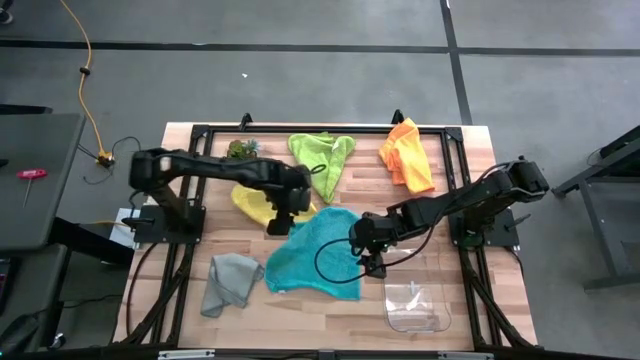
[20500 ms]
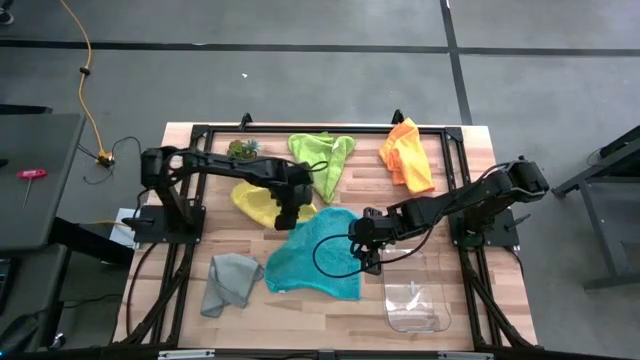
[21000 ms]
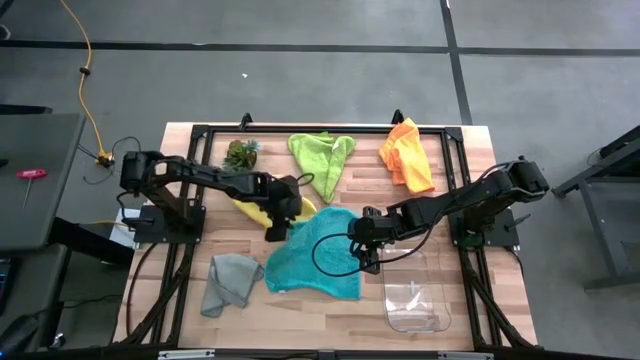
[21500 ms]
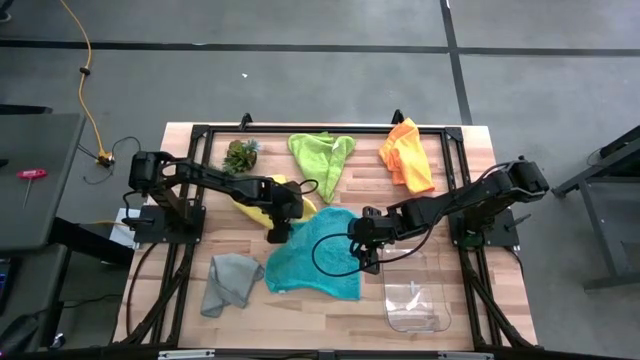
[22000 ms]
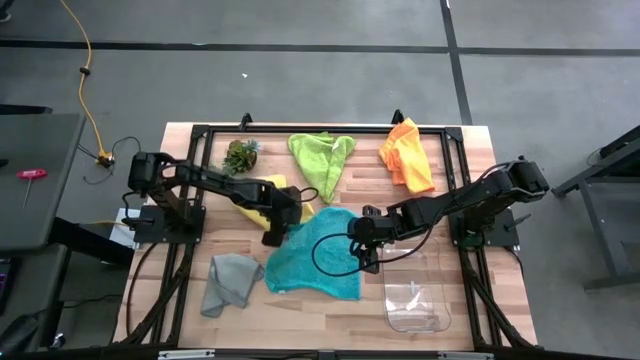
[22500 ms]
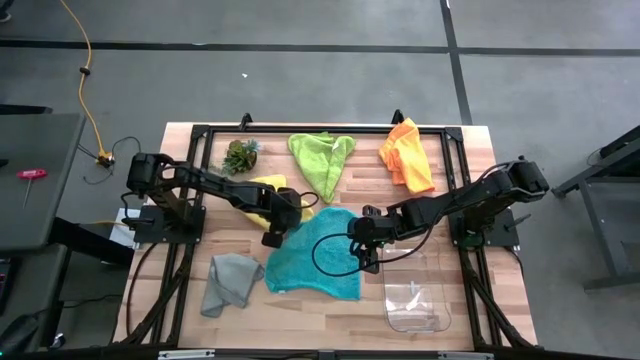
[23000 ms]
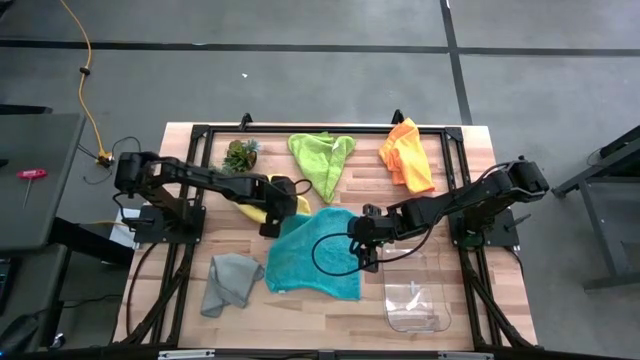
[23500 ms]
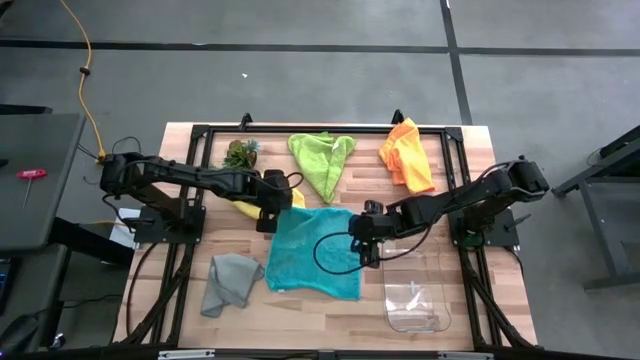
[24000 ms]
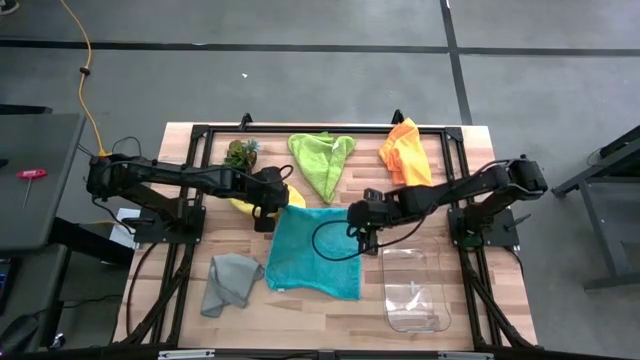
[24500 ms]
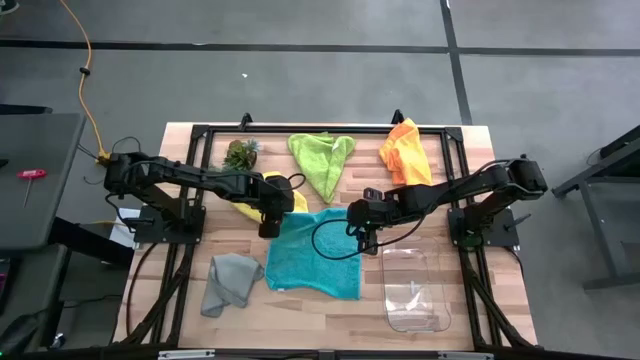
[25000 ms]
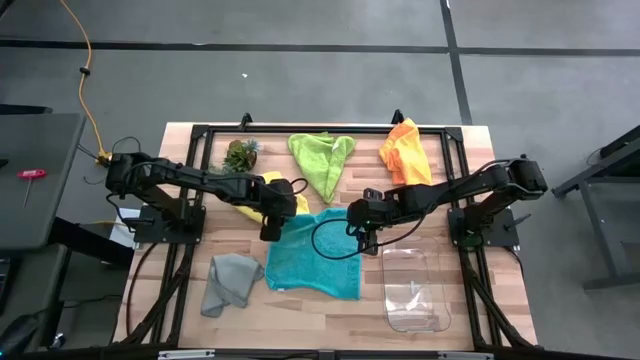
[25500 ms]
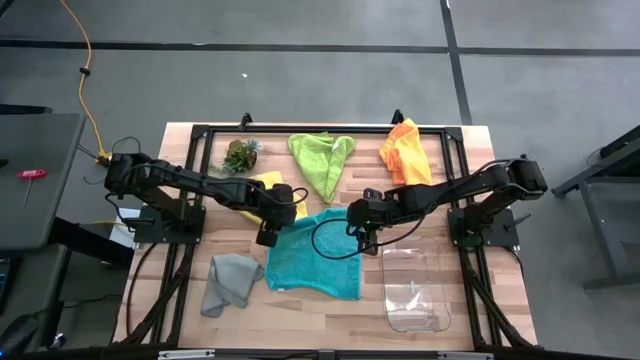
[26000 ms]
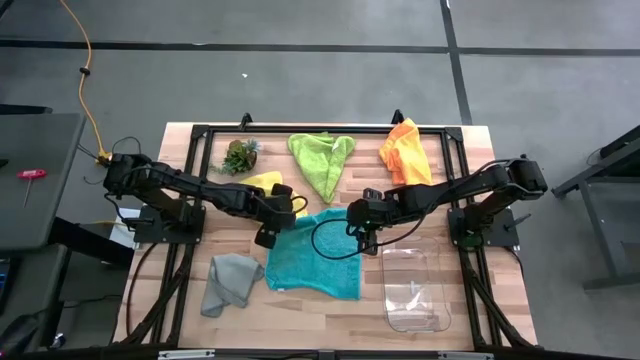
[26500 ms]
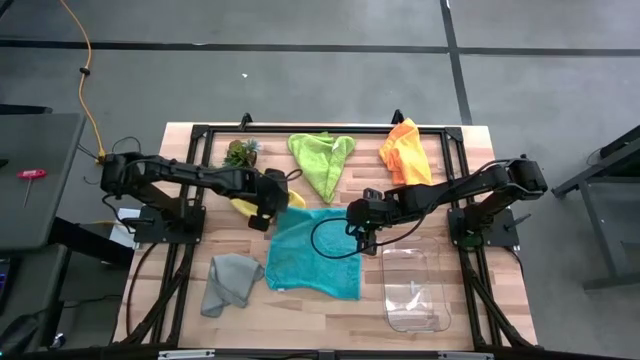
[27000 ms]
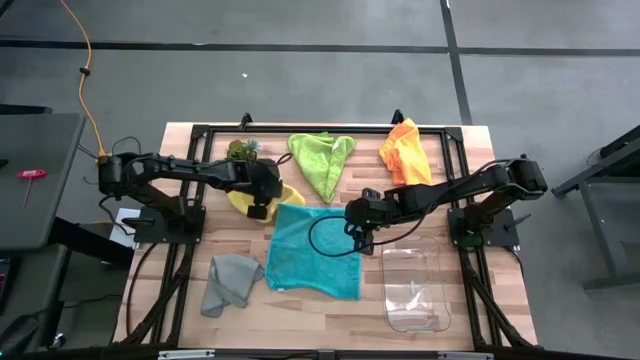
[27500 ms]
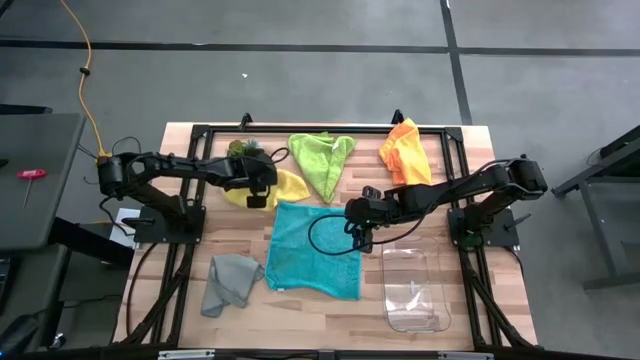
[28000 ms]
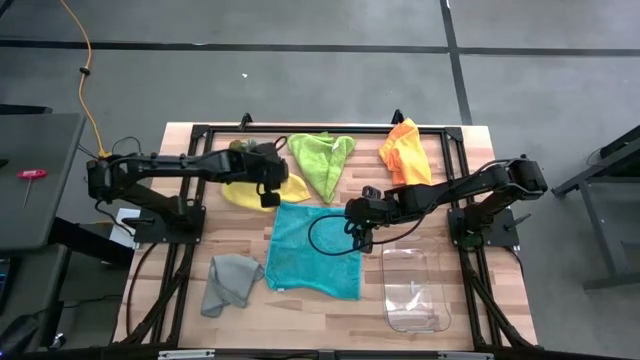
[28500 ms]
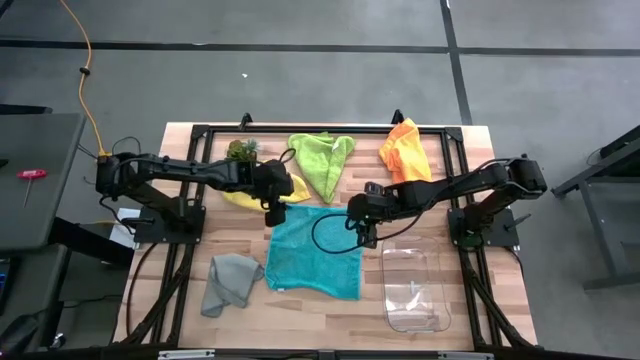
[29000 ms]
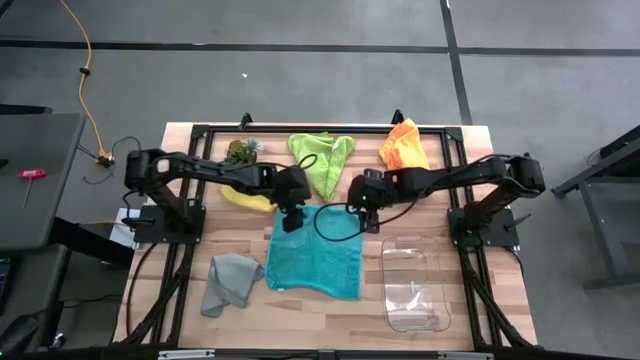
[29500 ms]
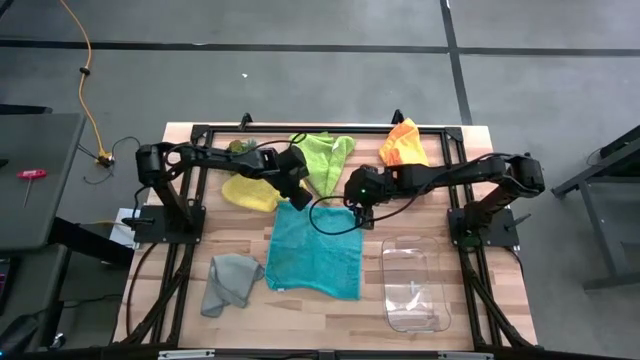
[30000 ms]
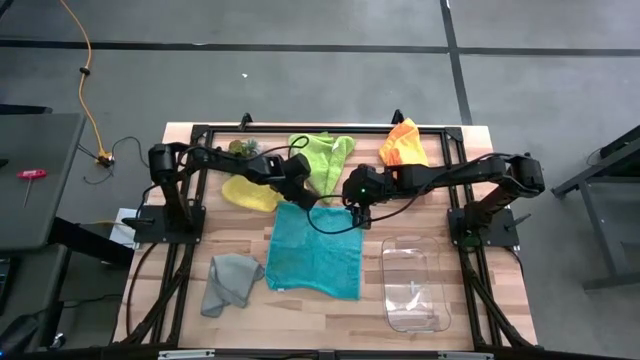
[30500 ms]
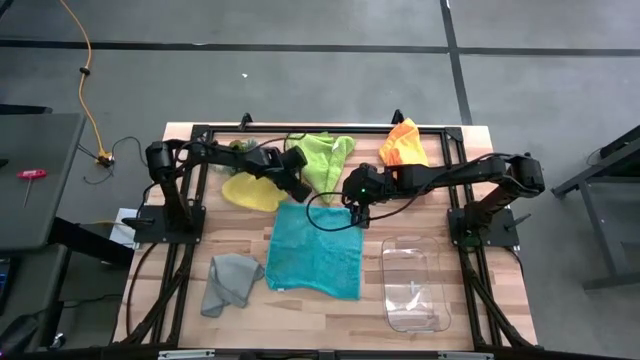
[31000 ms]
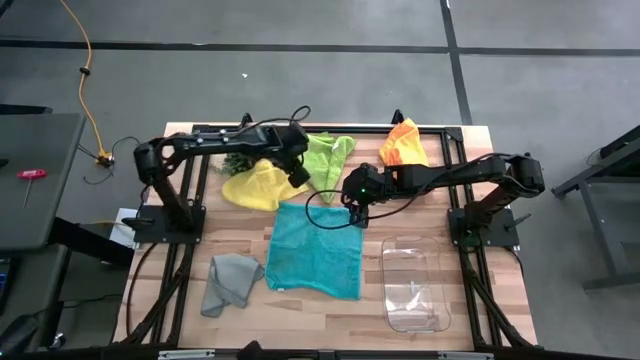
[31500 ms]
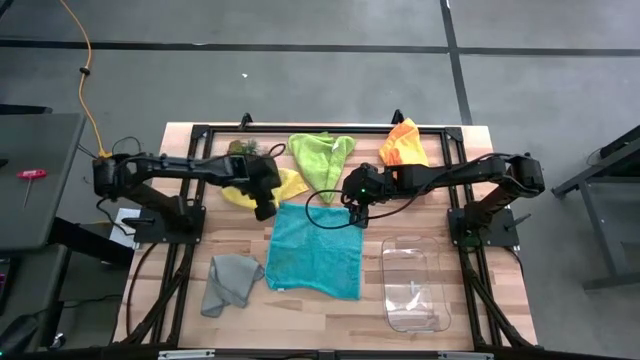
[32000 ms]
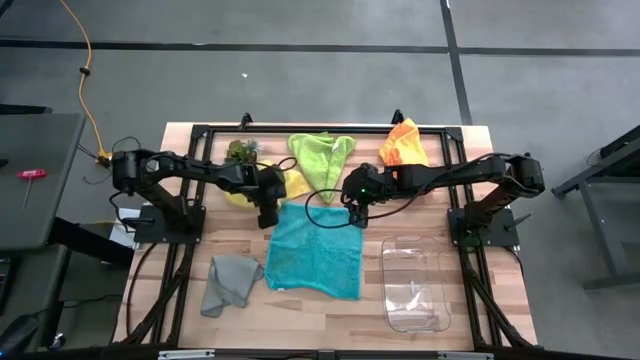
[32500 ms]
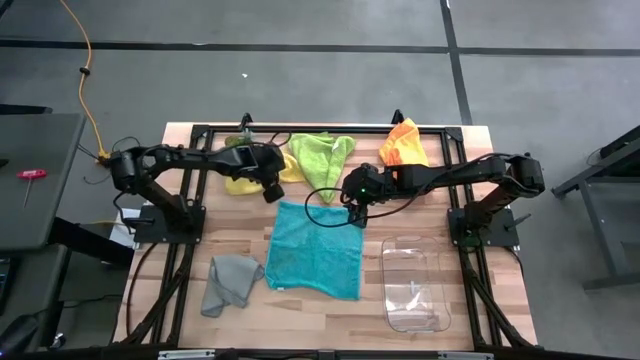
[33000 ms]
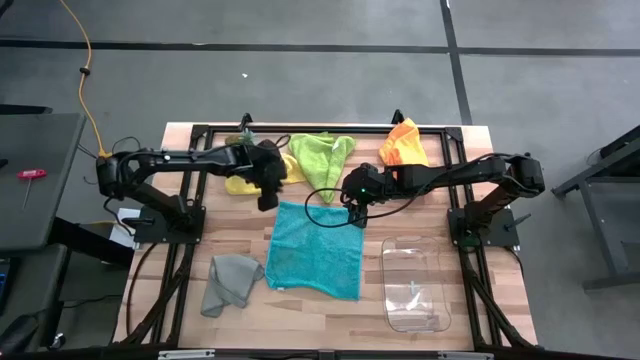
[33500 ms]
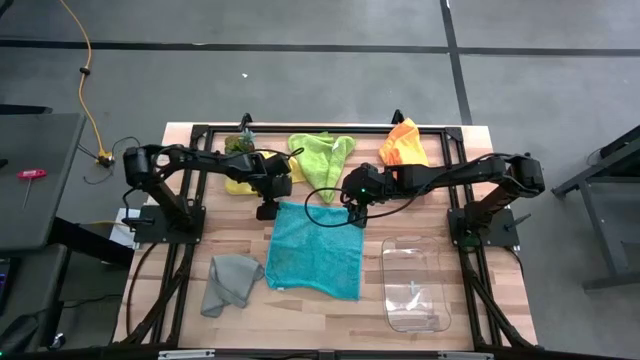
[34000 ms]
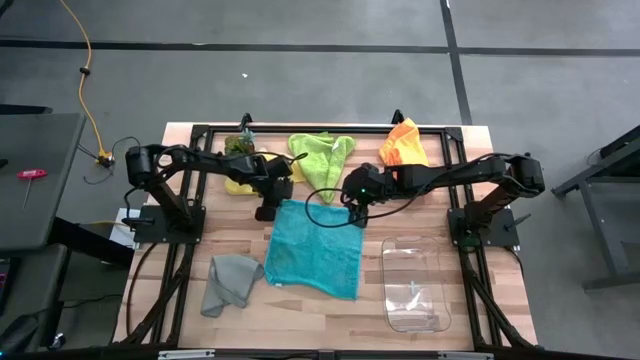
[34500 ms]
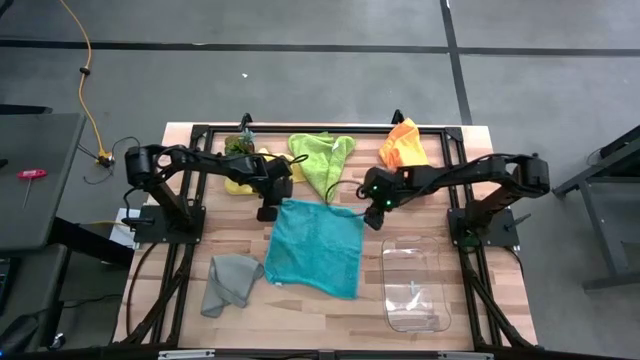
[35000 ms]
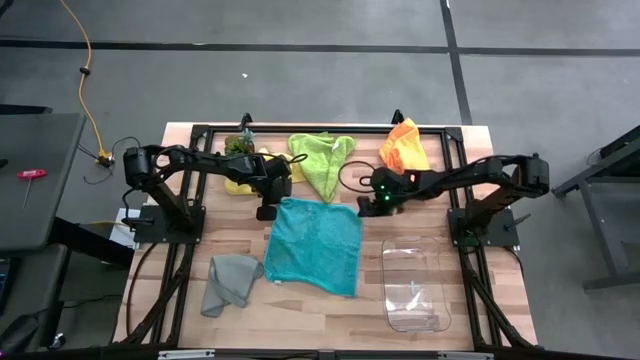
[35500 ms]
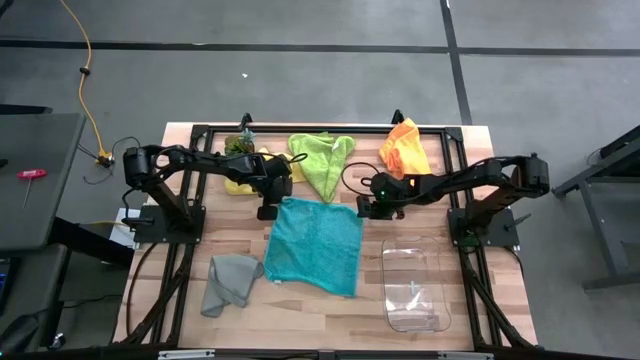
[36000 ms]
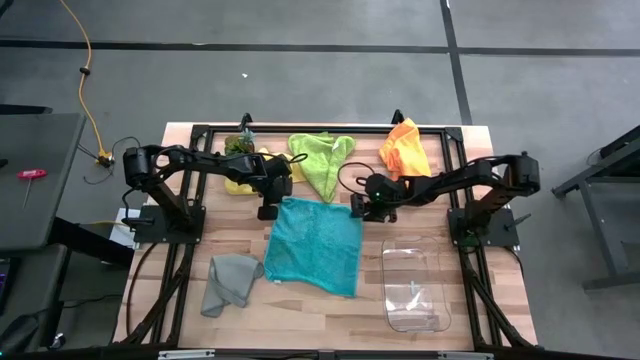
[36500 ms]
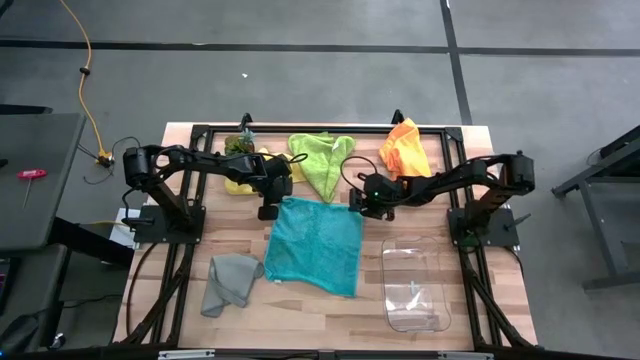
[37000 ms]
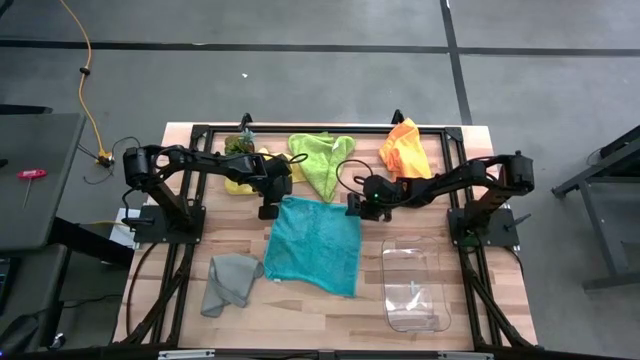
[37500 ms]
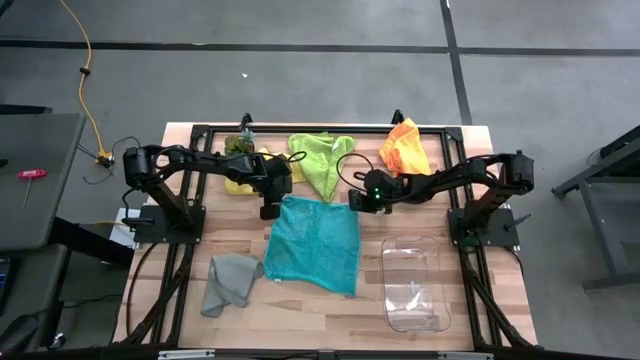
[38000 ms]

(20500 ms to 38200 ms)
Task: Fold microfiber towels
Fold the blue microfiber cloth

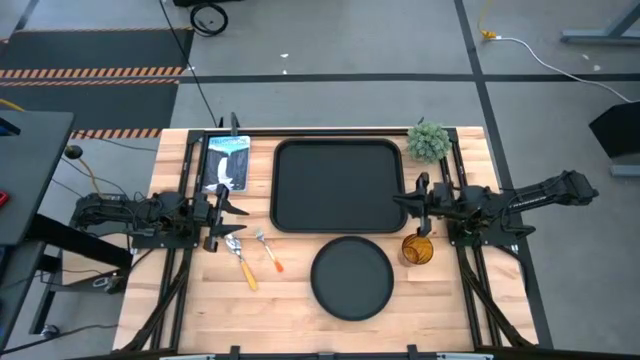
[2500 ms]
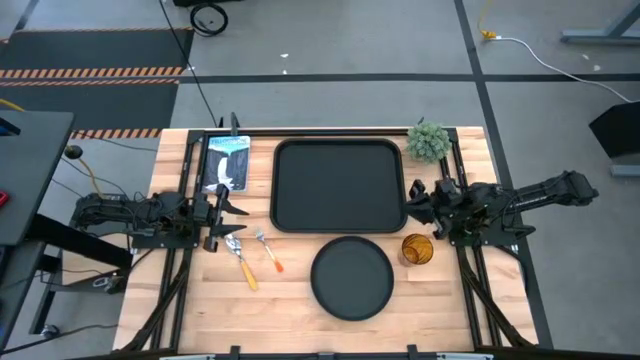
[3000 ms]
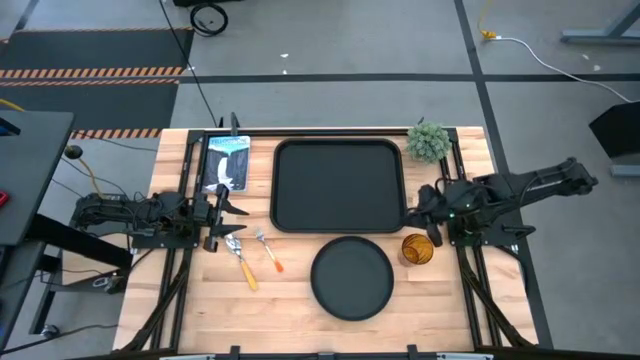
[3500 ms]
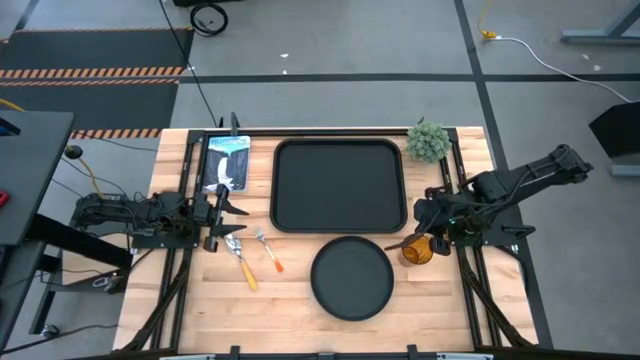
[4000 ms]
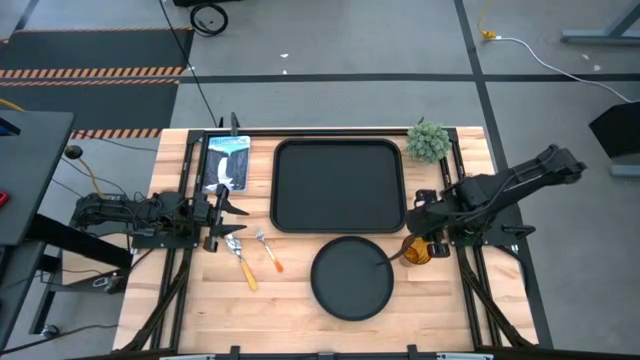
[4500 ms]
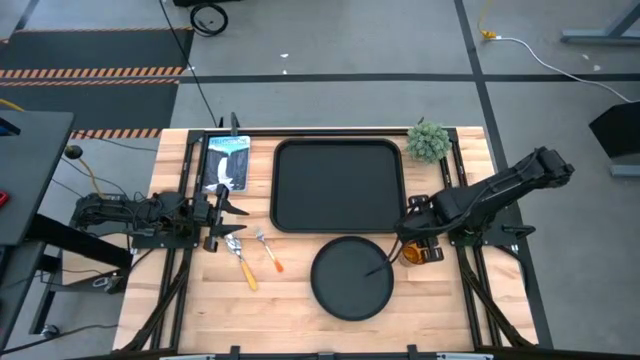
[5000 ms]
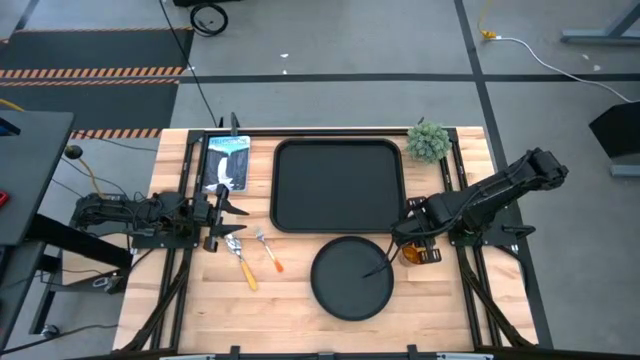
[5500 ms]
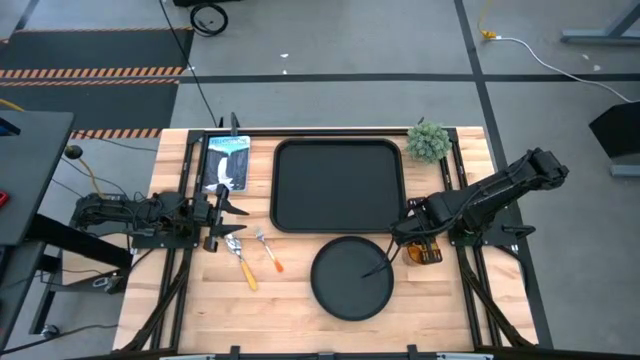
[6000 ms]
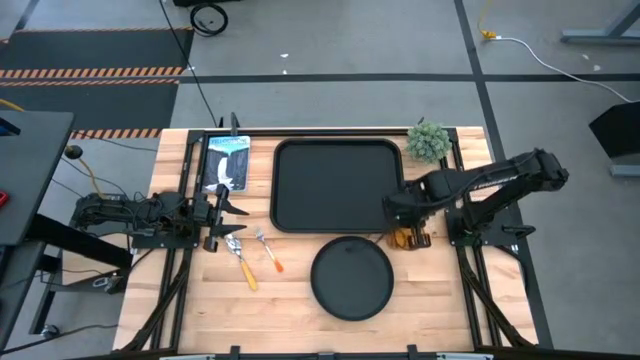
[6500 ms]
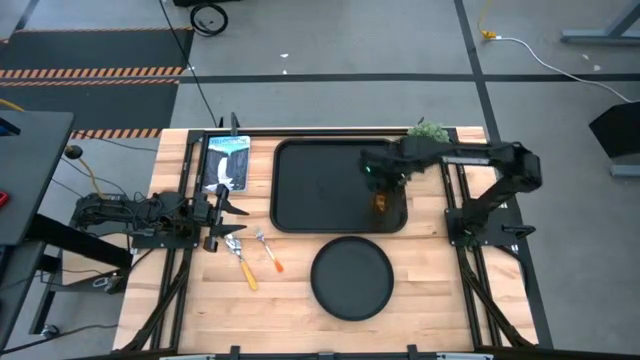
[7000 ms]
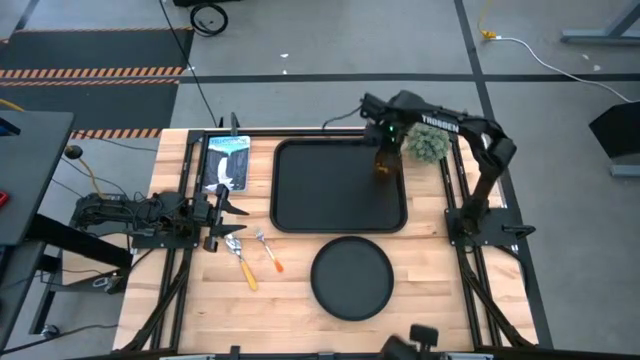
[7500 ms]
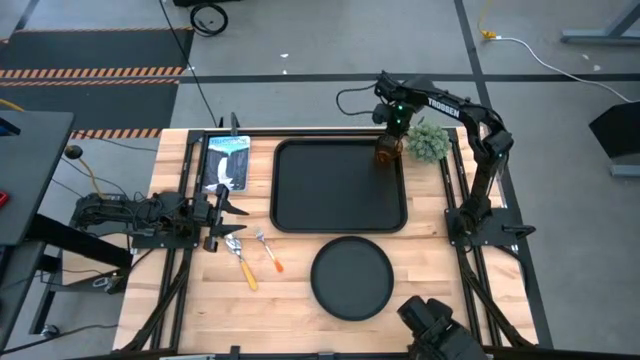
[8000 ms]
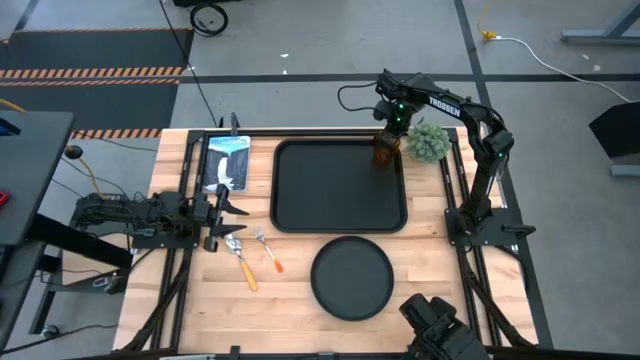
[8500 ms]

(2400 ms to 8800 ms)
Task: Pick and place plate/cup/fork/spoon on tray
Put the brown cup on the black tray
